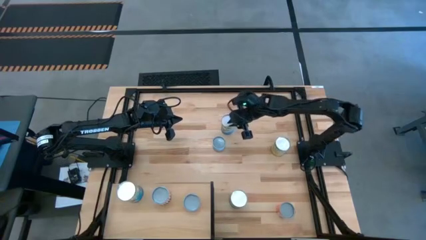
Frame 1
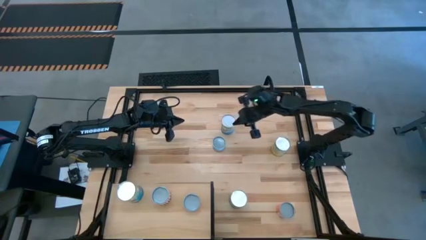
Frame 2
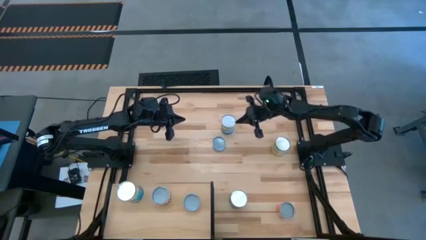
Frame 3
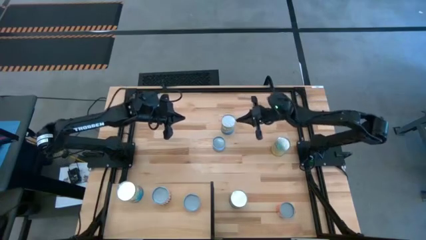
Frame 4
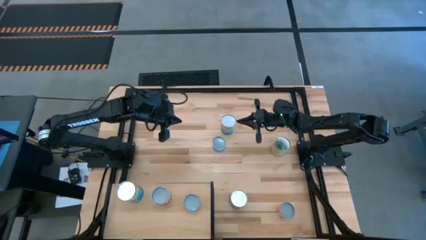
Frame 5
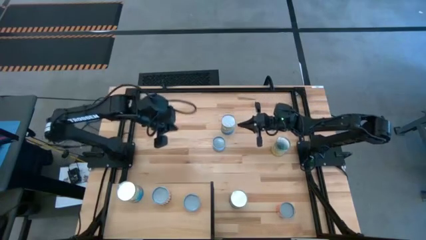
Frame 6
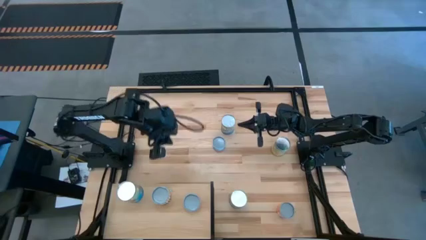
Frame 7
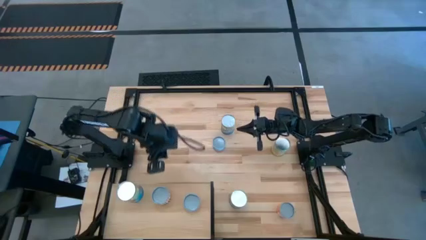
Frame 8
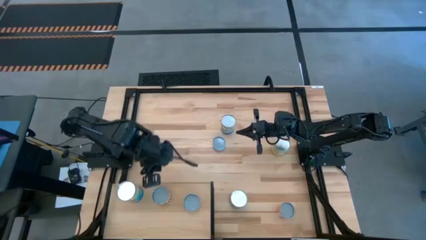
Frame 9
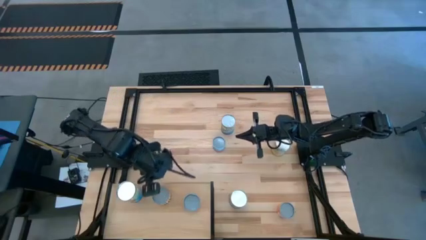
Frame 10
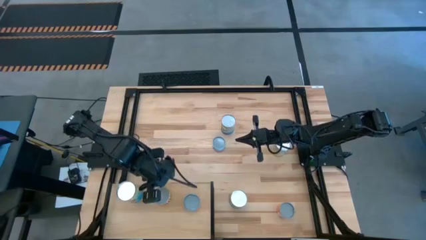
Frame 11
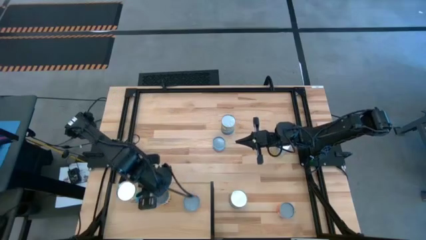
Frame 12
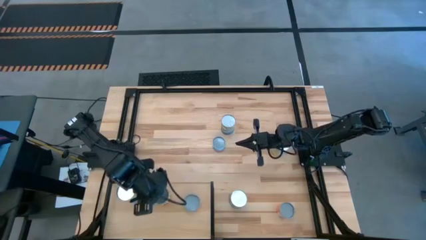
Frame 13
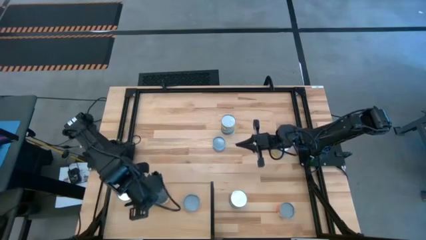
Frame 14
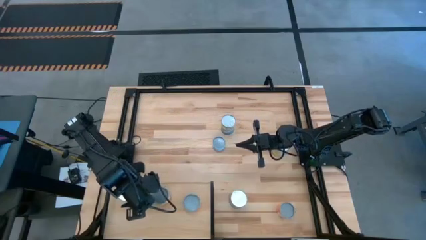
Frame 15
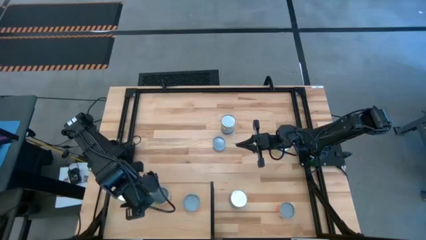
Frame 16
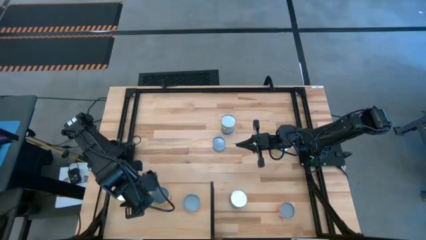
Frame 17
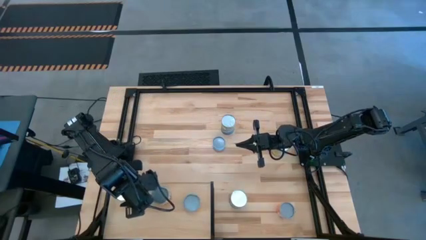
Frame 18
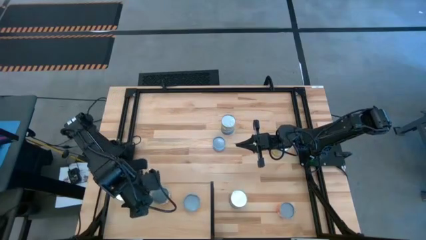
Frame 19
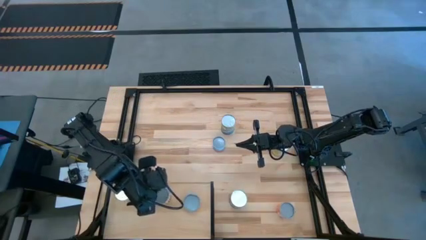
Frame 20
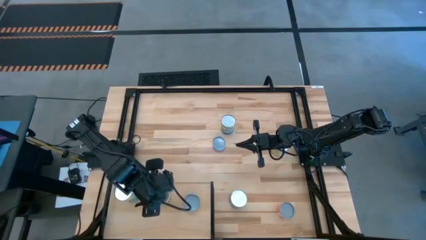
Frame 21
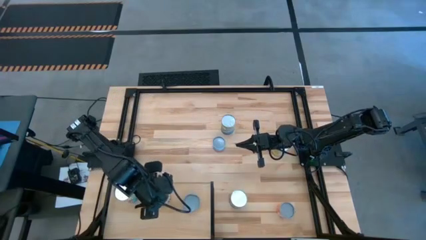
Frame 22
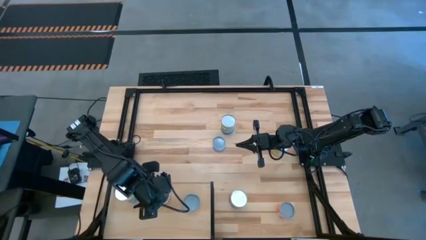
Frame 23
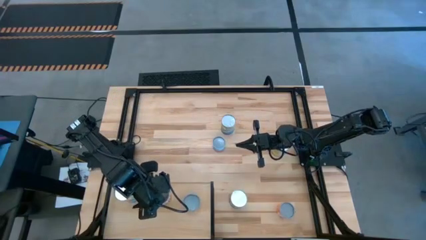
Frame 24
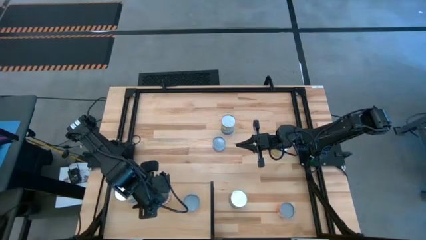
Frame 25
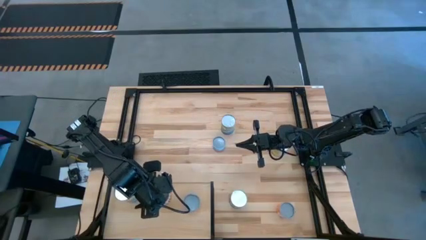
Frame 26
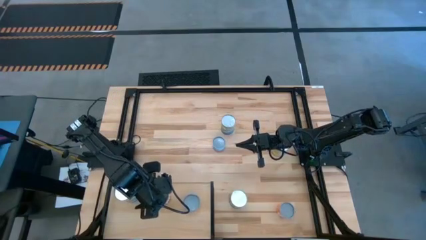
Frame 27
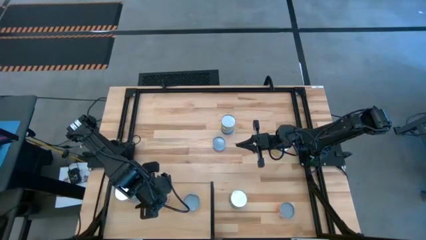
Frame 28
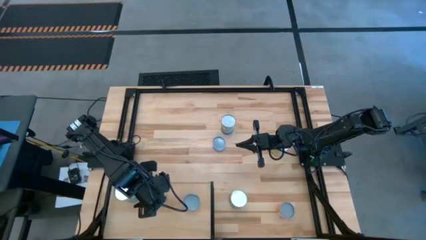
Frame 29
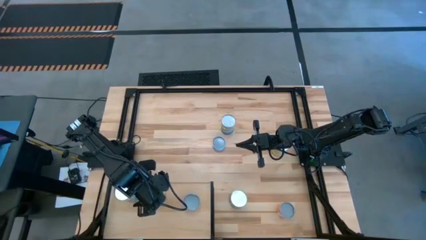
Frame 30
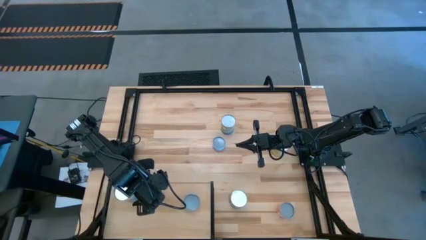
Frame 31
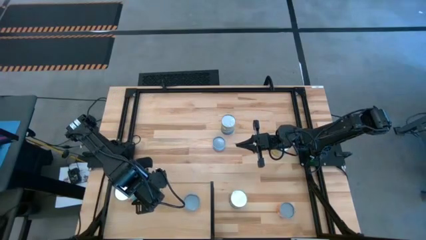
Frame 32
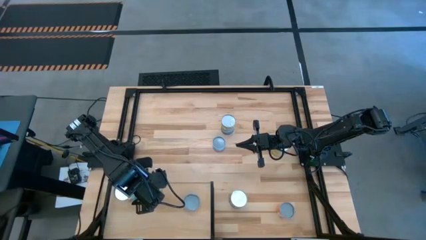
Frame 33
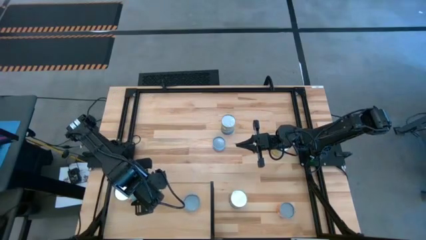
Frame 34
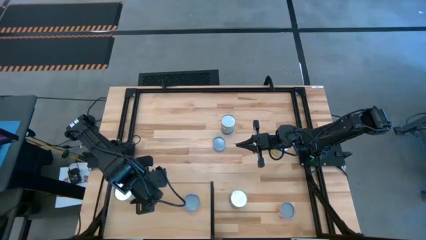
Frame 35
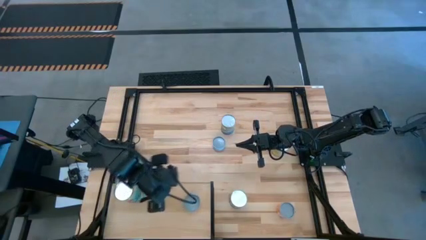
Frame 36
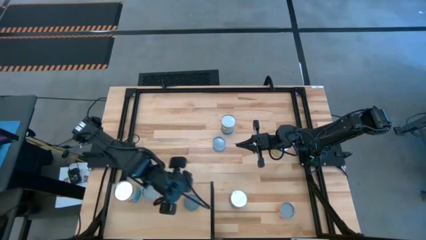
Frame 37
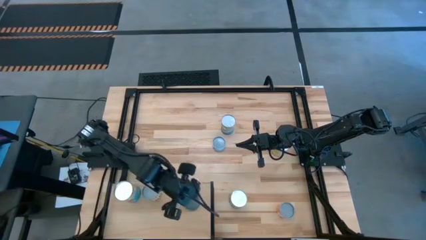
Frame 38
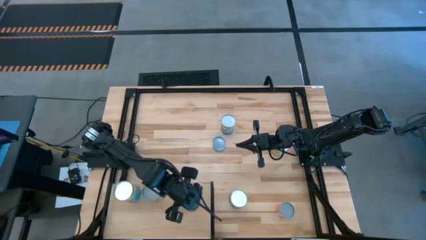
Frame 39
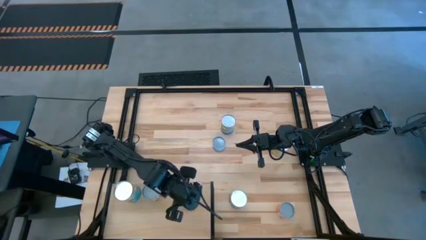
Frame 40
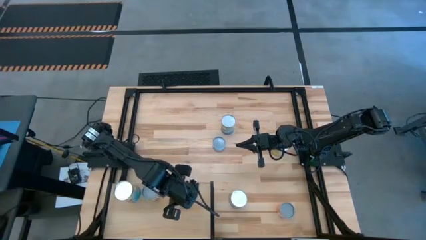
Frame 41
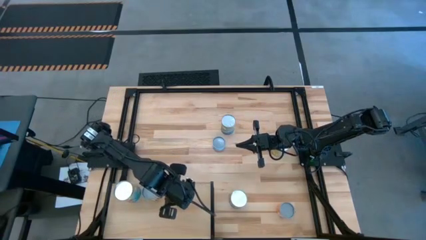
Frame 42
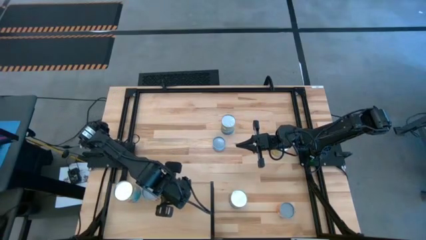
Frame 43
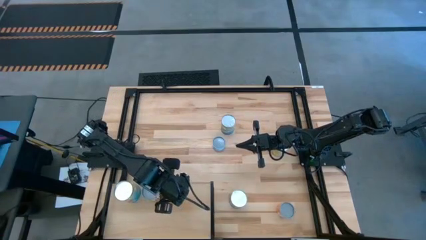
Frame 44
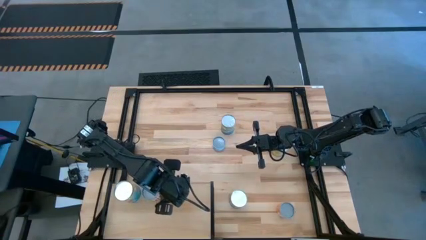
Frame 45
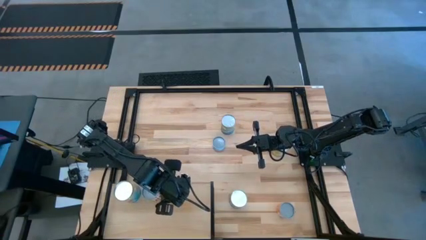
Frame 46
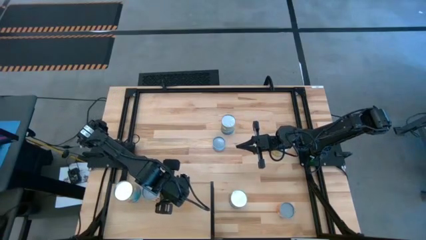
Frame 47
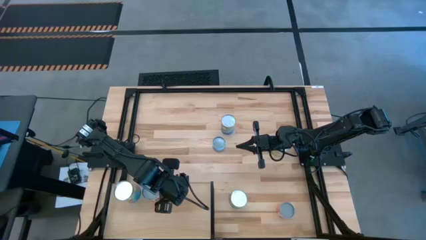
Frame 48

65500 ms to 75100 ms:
Task: Pick and place cans onto a shelf
Adjust the canned goods on the shelf

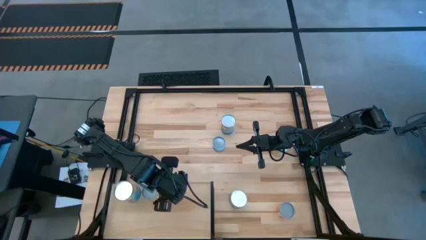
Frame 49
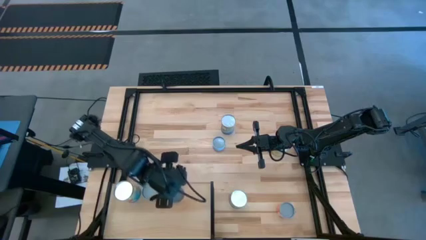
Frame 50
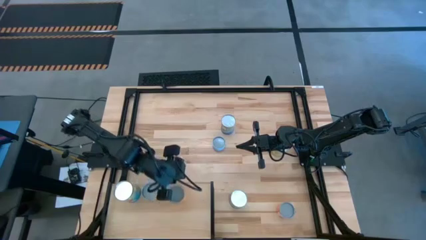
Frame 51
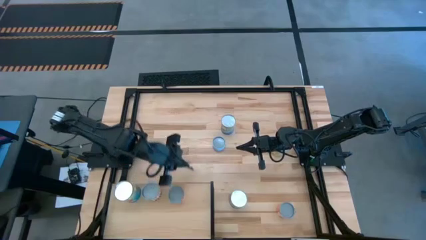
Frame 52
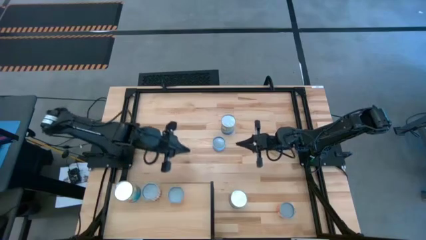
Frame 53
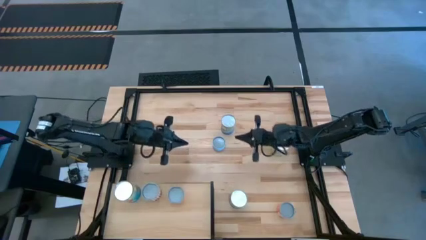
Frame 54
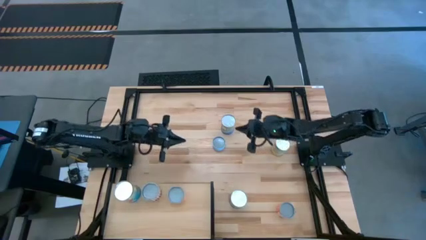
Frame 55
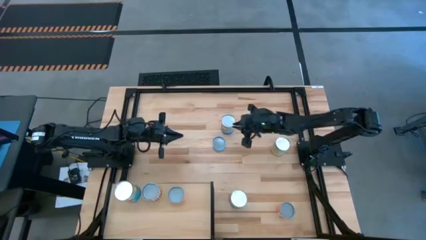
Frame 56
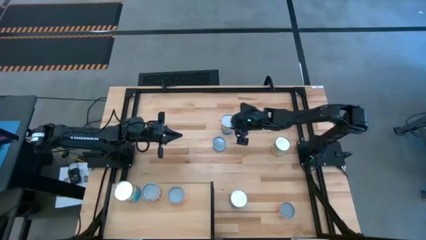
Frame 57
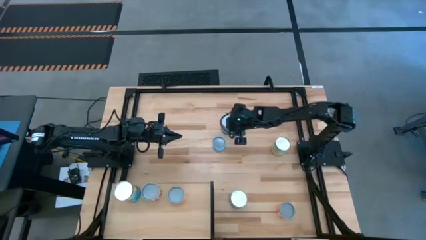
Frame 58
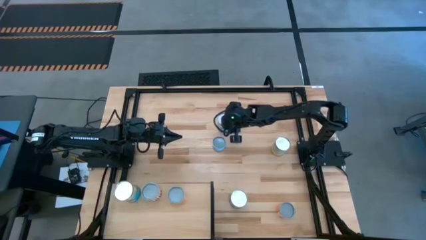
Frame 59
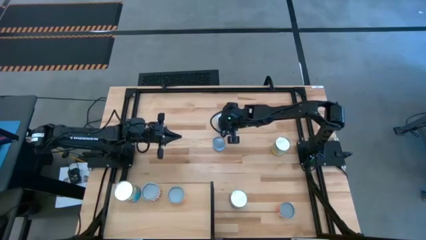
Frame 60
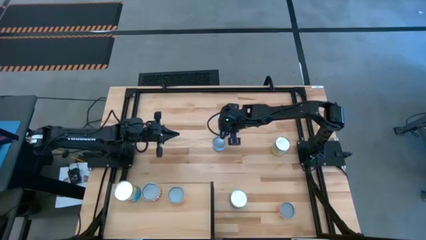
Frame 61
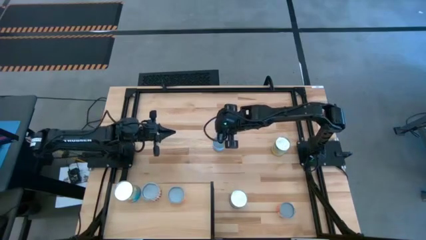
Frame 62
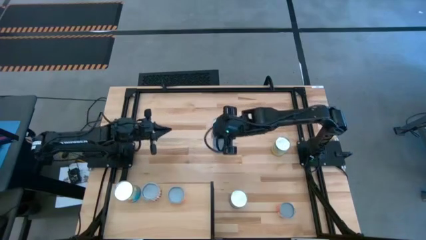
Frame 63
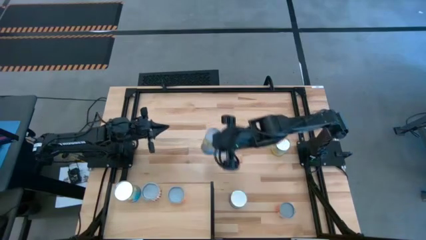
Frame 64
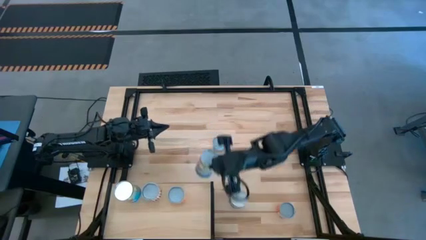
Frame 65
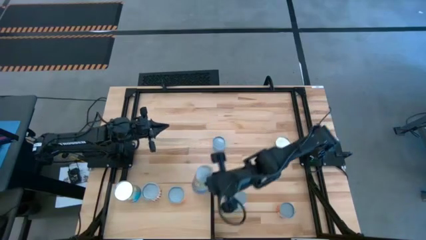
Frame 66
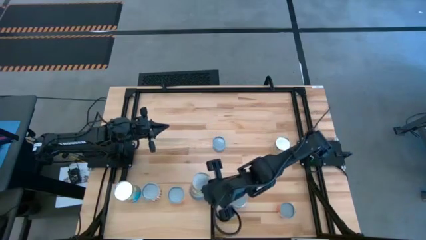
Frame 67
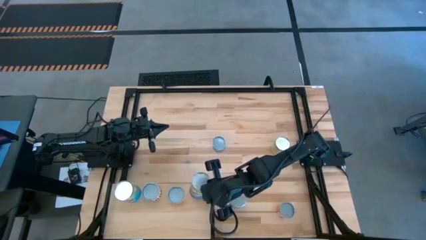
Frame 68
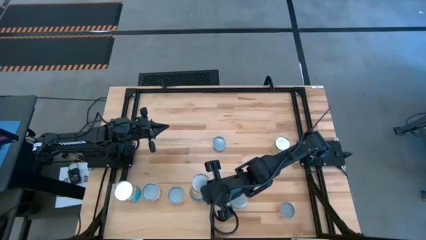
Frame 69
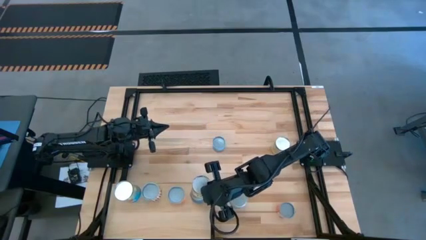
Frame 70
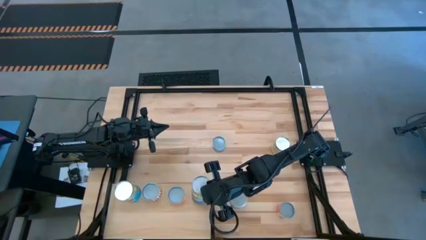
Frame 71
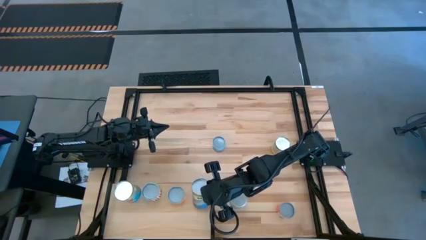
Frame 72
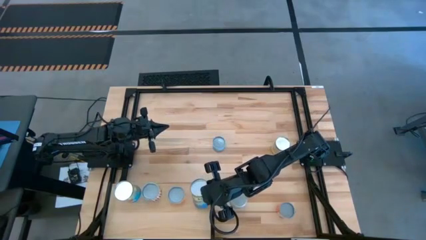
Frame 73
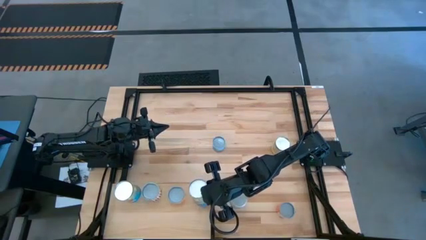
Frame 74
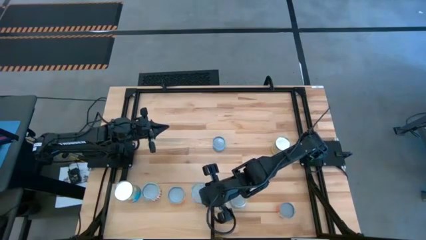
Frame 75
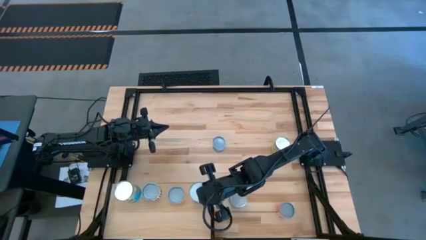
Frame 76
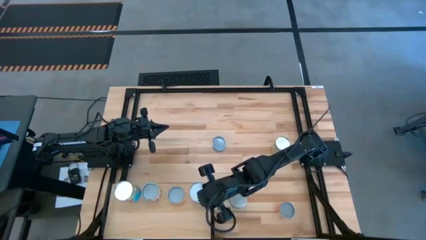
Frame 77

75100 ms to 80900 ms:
Put the canned peas on the shelf
